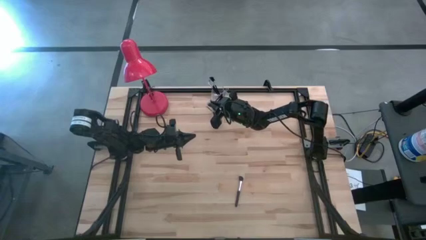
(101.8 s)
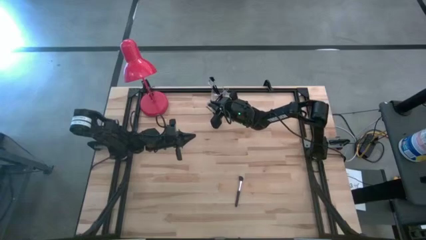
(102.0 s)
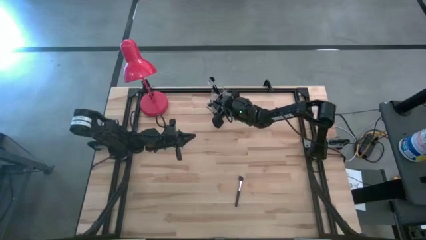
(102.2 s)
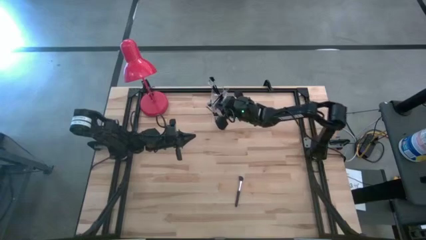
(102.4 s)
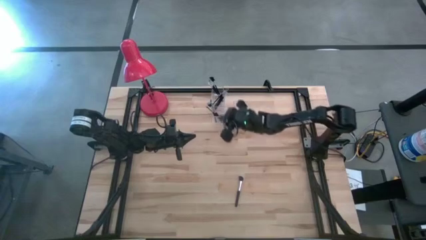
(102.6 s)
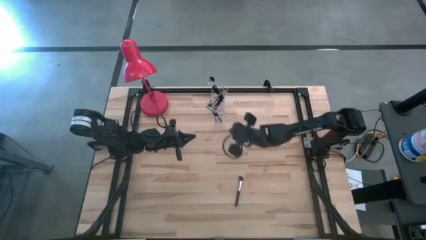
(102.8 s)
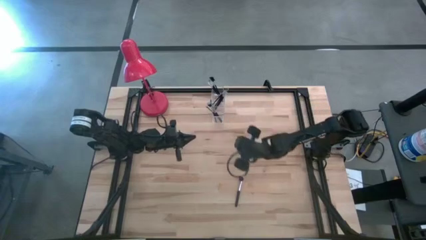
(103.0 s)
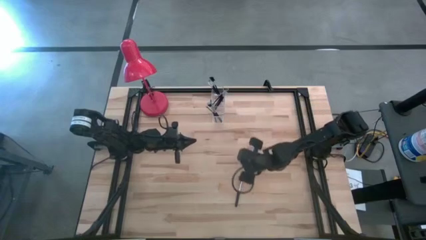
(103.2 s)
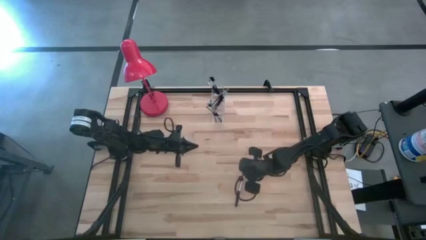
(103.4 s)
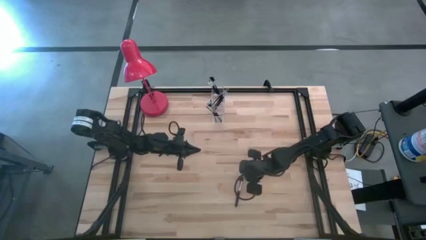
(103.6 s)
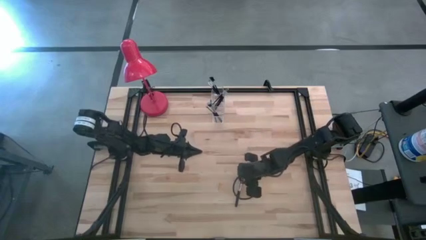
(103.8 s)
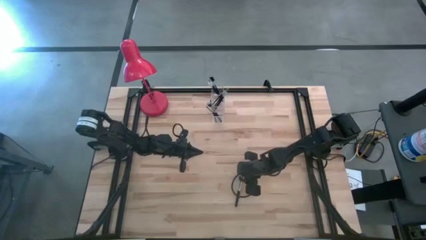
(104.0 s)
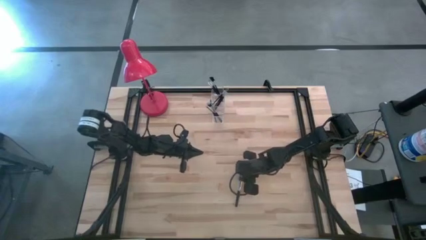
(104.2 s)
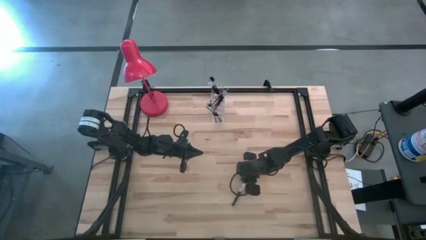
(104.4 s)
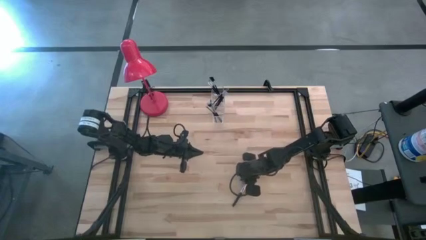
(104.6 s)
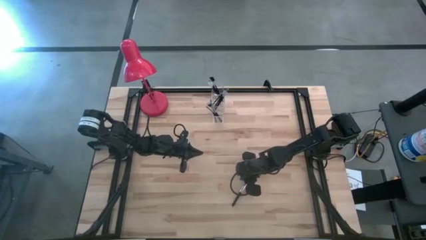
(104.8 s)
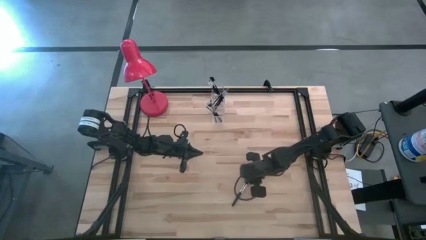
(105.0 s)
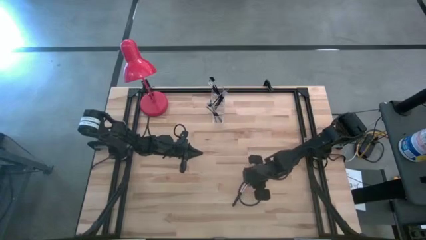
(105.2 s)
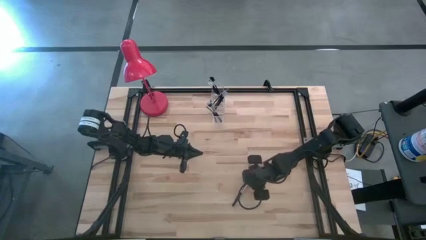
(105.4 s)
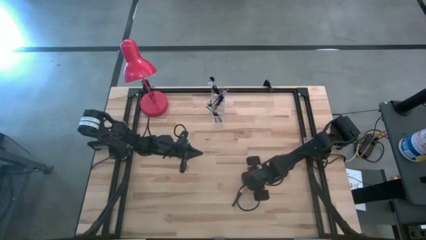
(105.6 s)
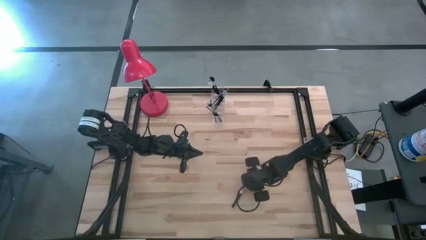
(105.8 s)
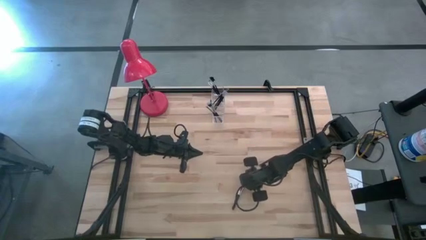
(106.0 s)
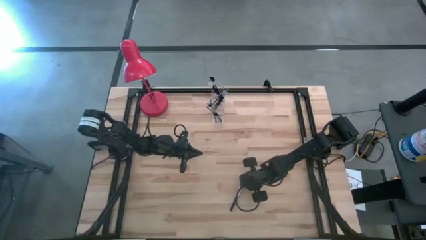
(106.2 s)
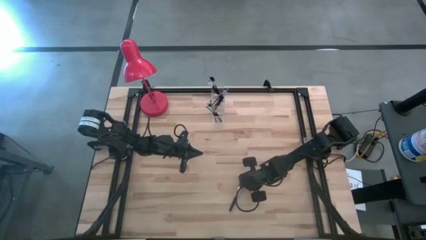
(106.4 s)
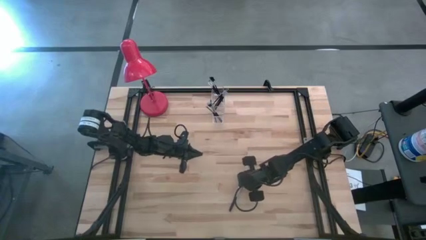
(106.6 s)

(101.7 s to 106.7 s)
Task: Put items in baskets/containers
Put the black powder brush into the transparent organizer

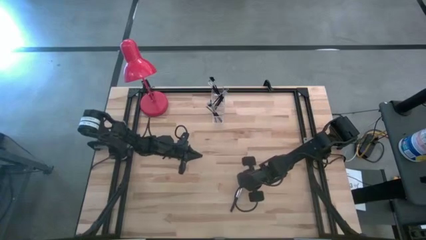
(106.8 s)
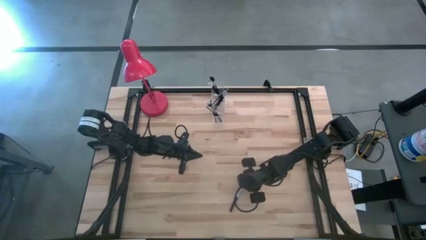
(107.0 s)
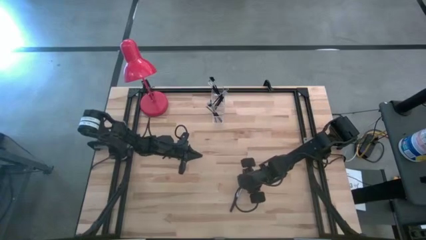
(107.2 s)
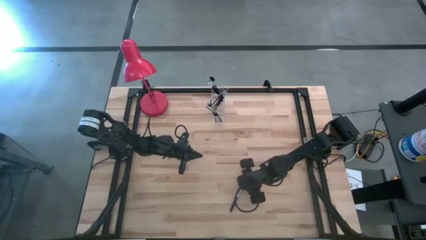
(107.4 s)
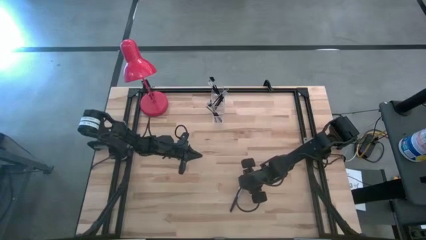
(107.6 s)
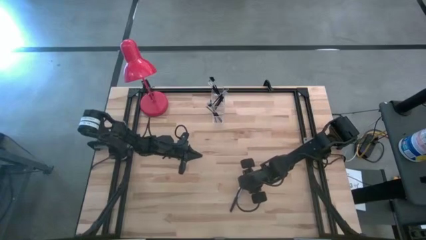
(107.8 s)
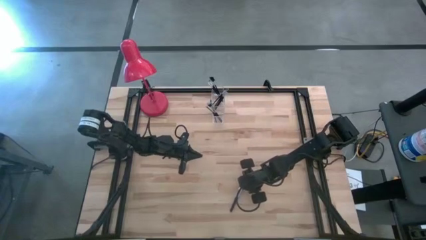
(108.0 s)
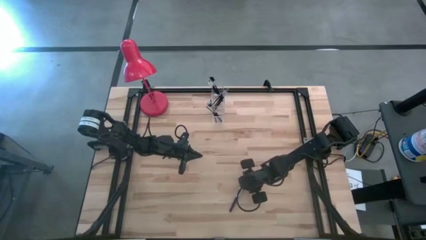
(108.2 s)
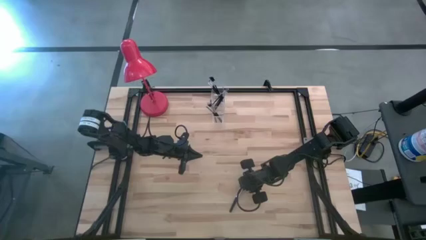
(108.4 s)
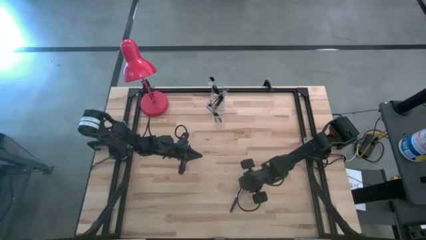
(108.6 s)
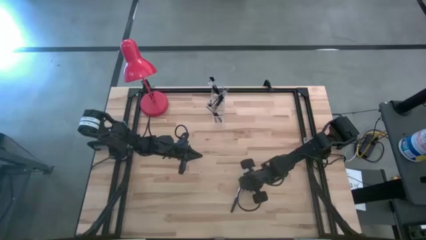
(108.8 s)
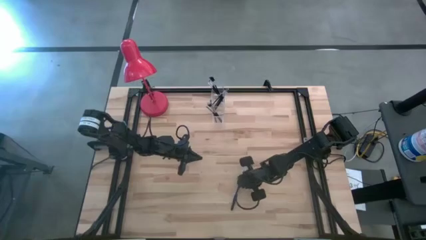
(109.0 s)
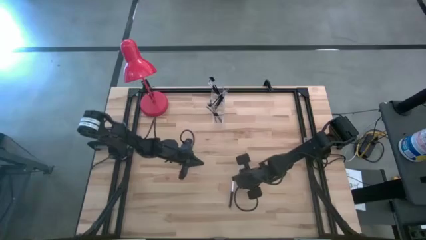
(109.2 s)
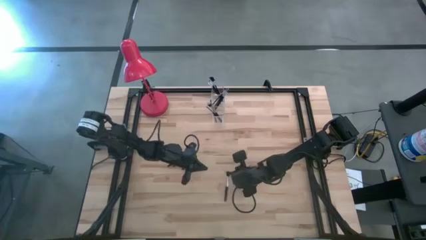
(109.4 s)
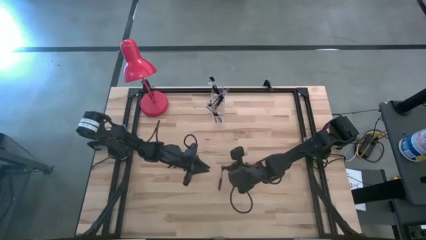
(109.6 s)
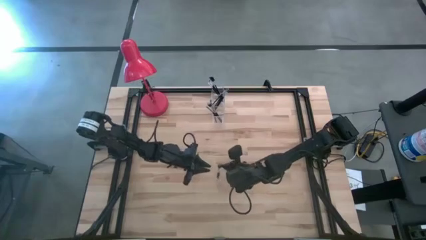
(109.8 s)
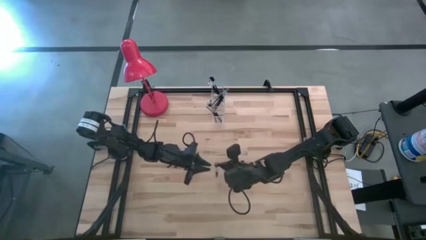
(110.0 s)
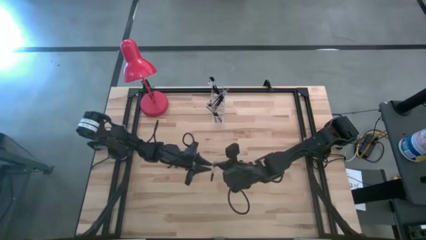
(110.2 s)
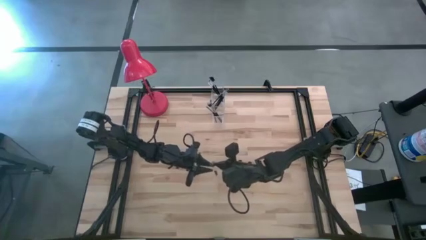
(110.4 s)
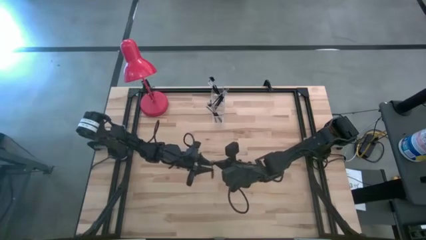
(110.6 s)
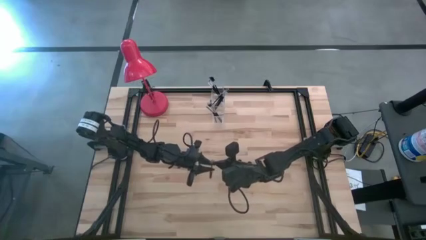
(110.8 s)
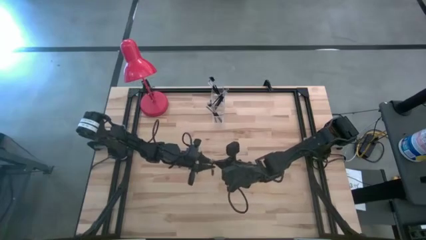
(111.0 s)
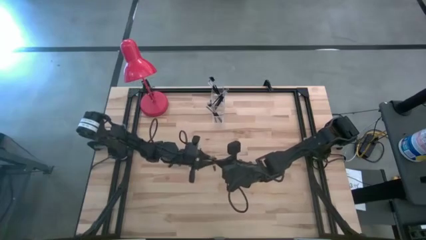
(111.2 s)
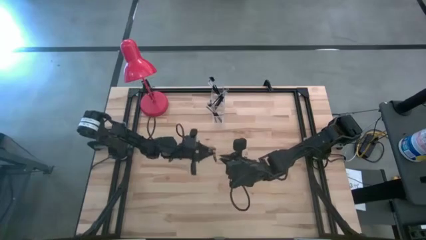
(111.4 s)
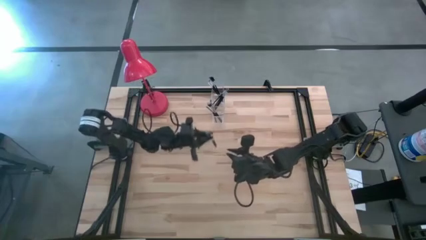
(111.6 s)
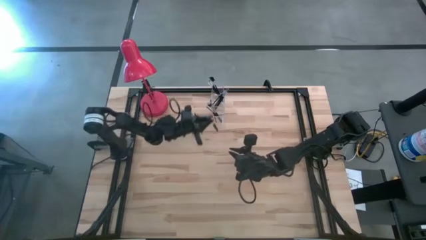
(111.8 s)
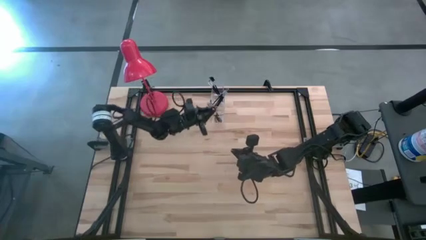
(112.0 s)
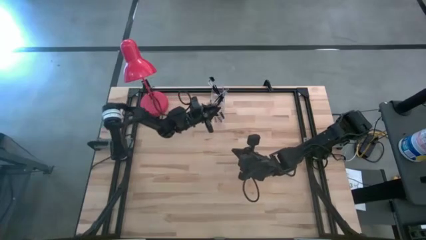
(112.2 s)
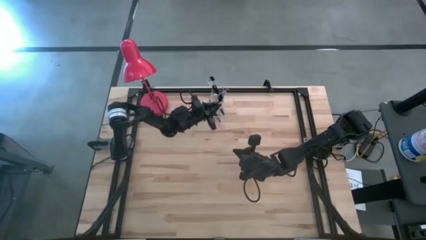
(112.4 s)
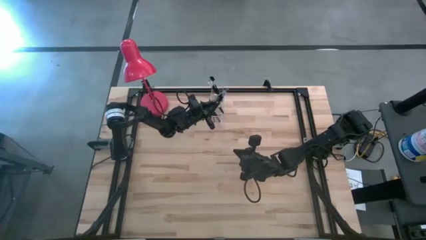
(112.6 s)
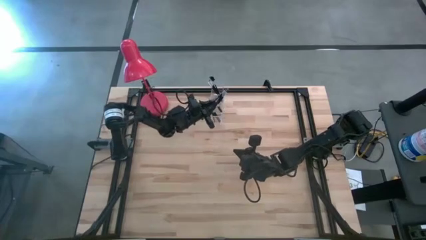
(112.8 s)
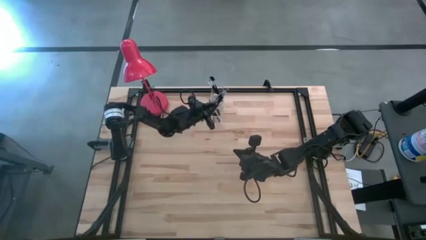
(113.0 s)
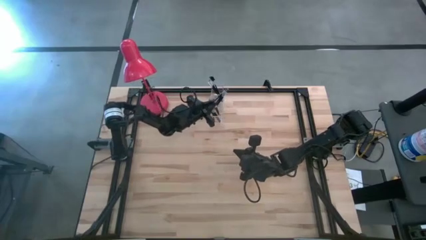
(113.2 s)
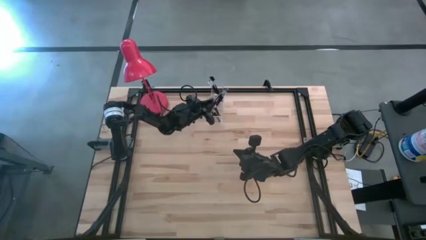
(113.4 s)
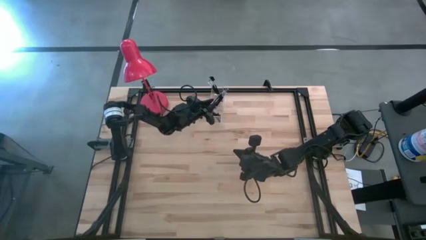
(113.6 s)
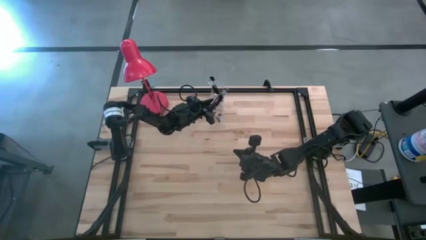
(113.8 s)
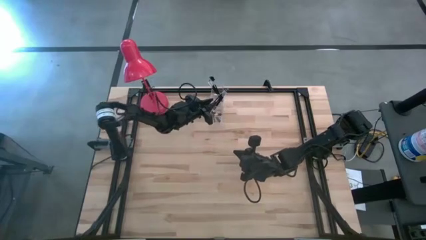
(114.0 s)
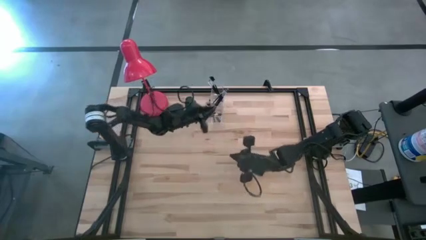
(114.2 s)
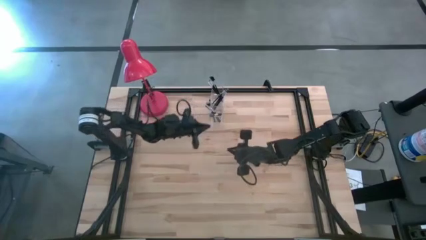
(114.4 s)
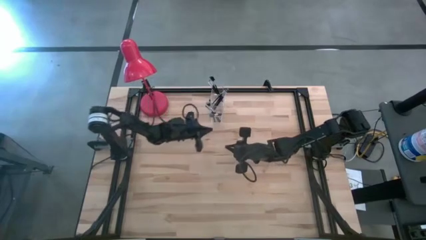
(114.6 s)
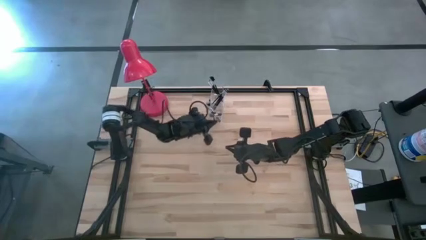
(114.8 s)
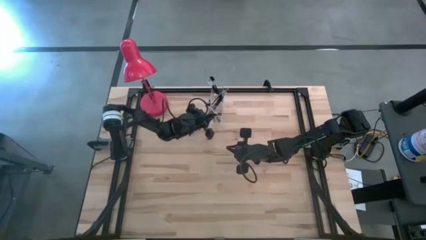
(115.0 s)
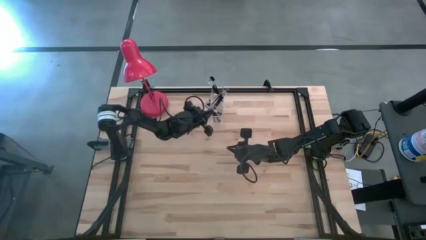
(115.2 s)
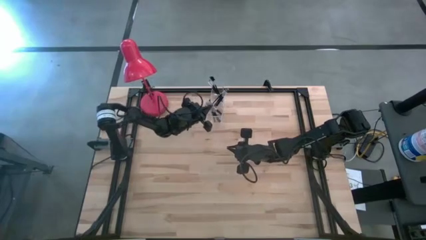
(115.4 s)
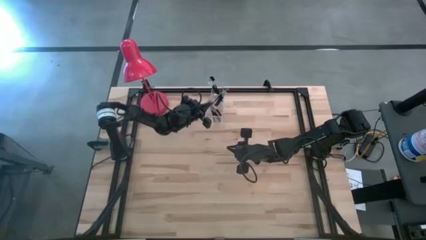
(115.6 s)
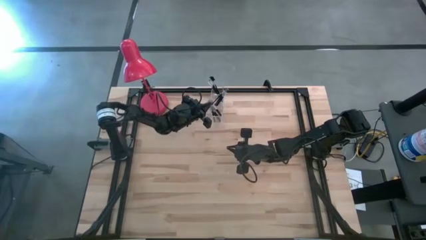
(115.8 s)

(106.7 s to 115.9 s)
Put the black powder brush into the transparent organizer

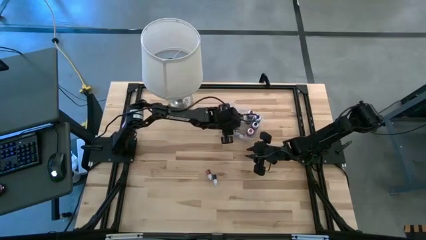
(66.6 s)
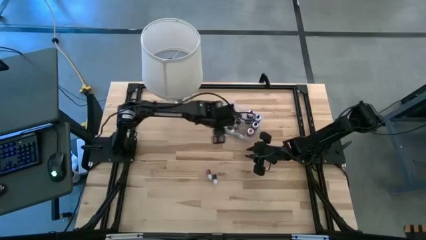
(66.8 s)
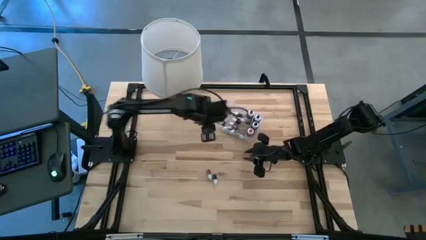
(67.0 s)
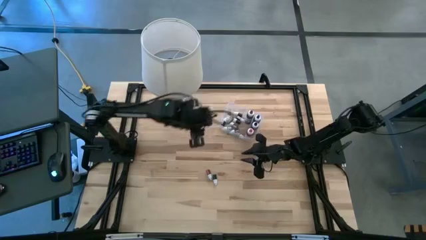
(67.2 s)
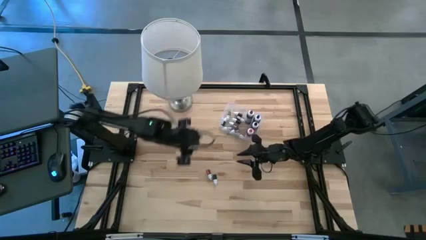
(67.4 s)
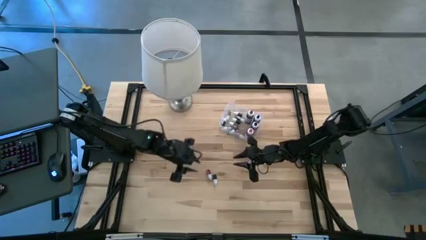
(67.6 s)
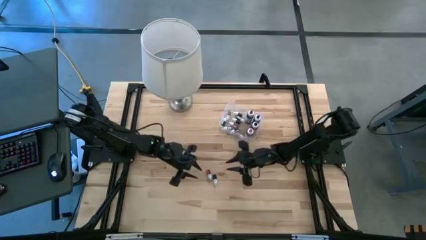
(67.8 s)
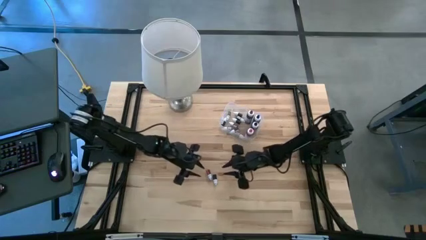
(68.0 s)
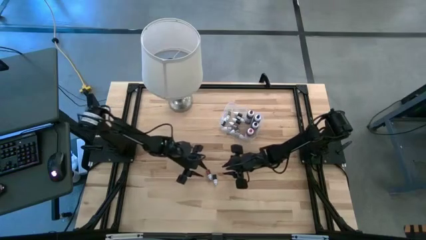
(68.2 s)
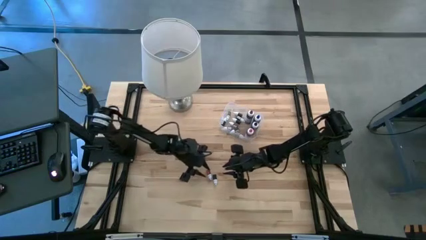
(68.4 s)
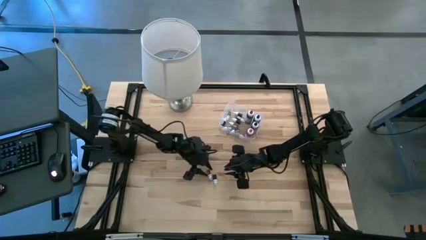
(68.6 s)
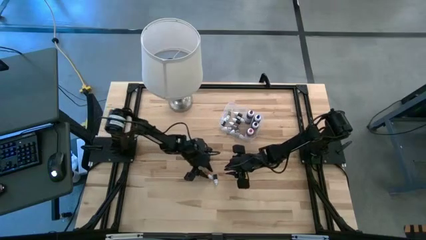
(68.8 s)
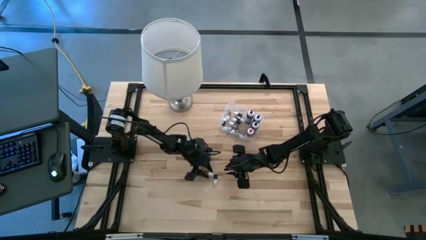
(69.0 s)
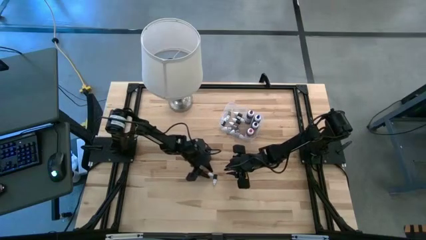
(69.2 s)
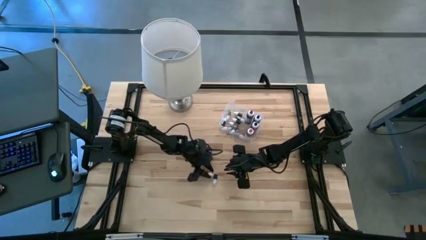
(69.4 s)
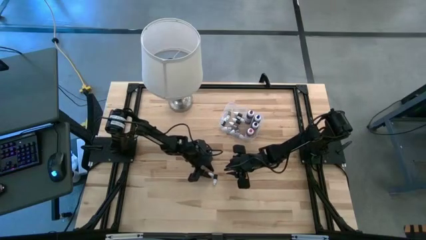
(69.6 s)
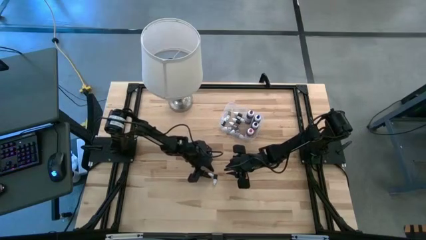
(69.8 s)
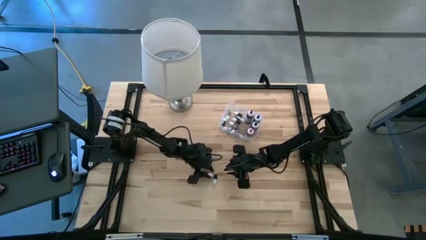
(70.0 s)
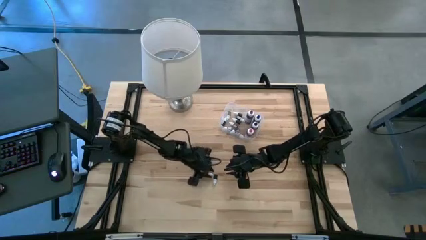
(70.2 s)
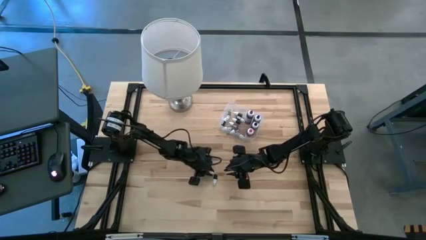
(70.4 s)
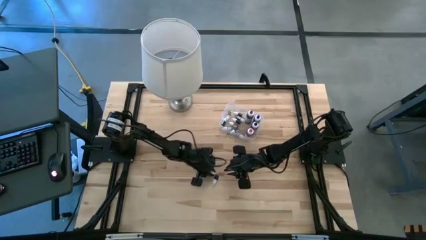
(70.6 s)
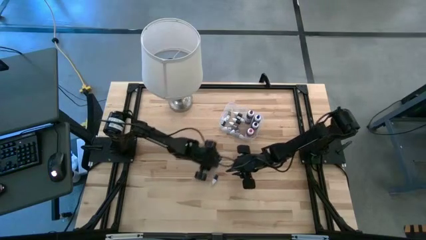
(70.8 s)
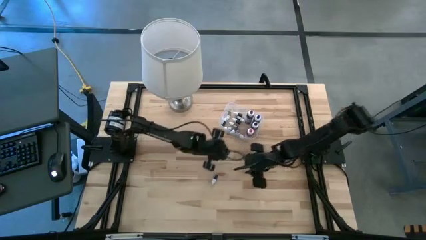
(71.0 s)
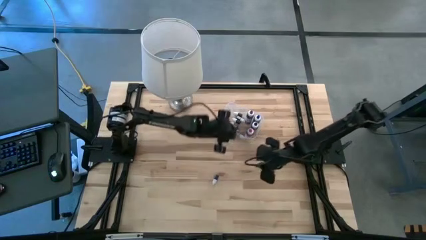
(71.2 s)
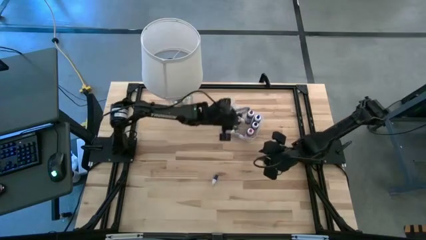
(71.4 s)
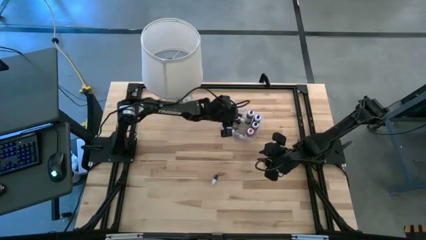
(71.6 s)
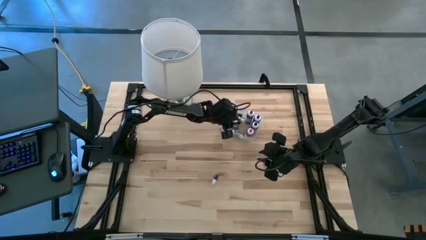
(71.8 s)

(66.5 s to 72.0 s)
Task: Pick & Place food coloring
Put the small red food coloring bottle into the transparent bin
